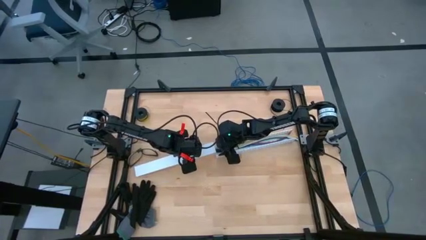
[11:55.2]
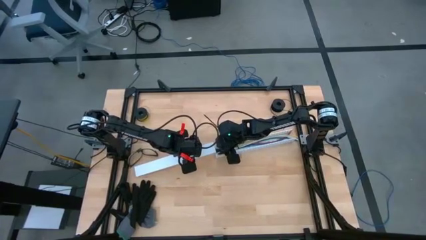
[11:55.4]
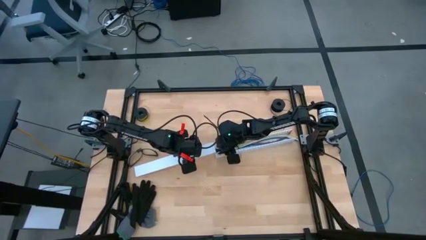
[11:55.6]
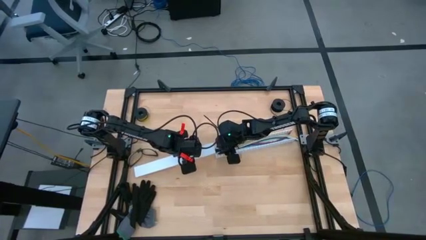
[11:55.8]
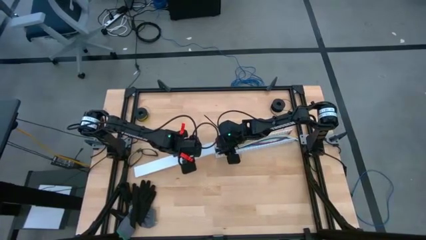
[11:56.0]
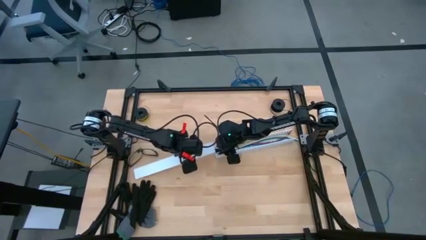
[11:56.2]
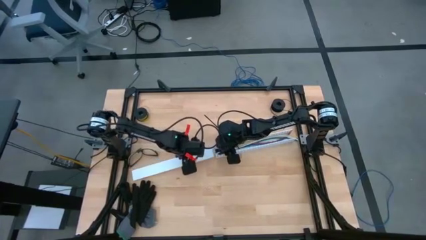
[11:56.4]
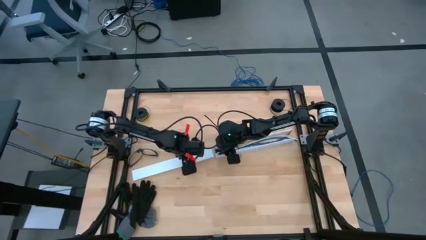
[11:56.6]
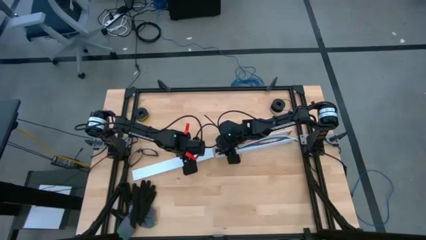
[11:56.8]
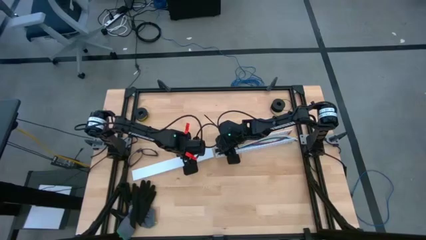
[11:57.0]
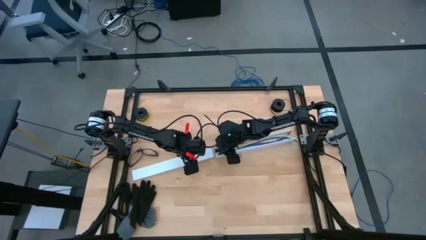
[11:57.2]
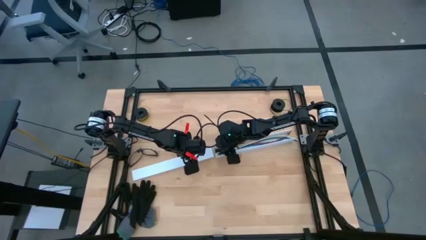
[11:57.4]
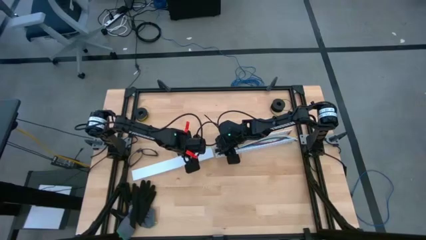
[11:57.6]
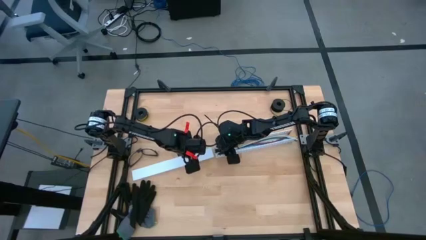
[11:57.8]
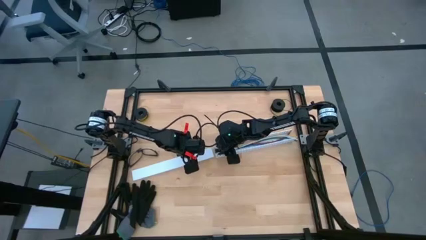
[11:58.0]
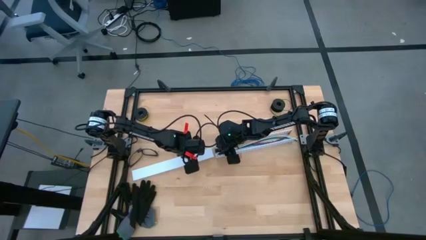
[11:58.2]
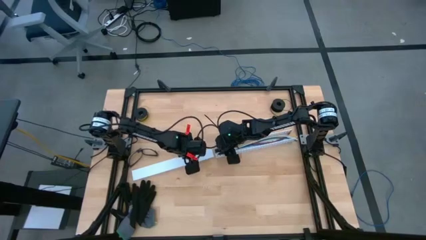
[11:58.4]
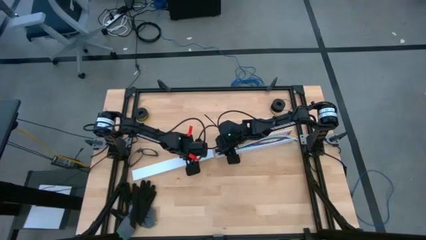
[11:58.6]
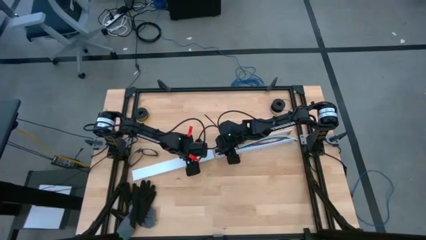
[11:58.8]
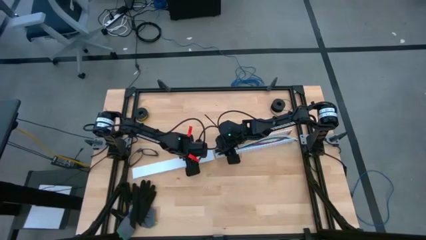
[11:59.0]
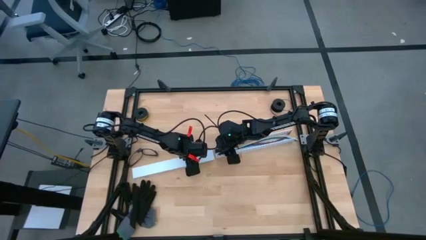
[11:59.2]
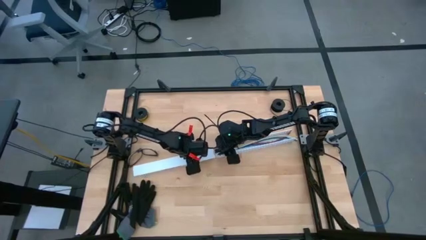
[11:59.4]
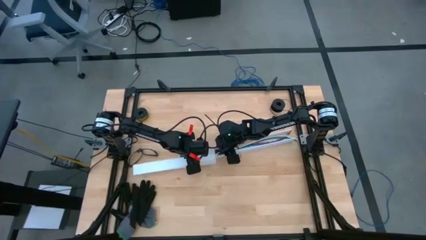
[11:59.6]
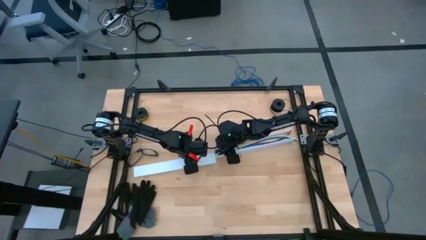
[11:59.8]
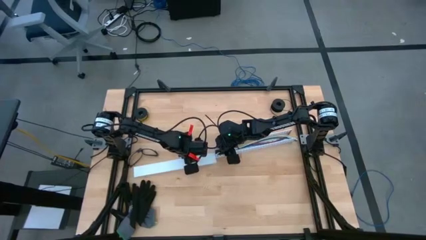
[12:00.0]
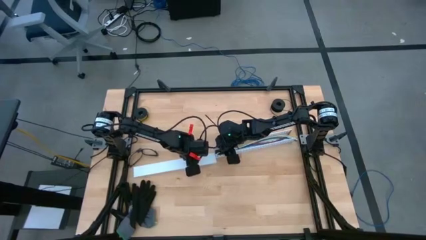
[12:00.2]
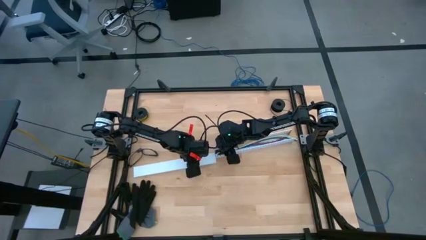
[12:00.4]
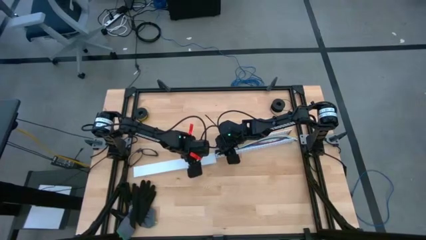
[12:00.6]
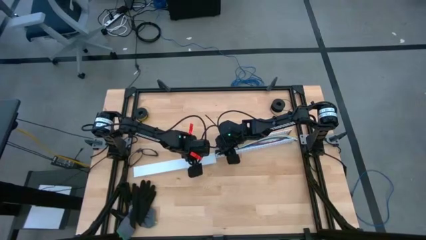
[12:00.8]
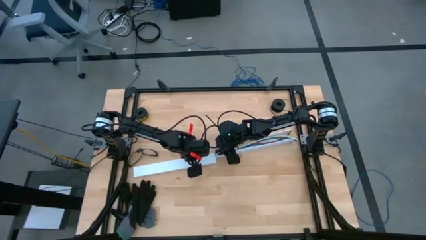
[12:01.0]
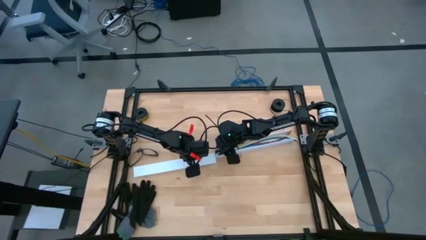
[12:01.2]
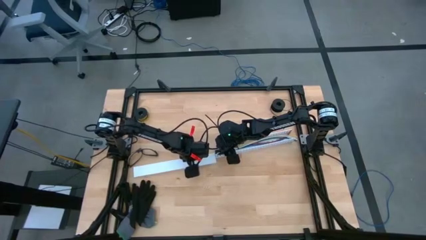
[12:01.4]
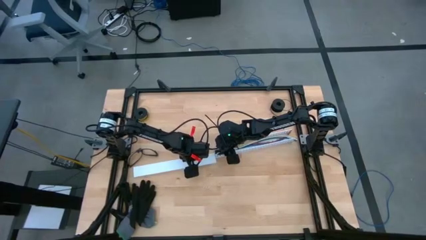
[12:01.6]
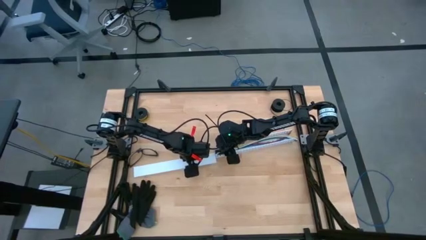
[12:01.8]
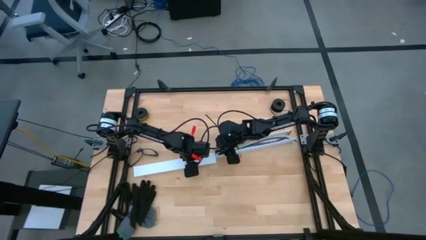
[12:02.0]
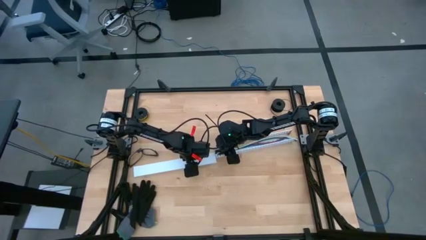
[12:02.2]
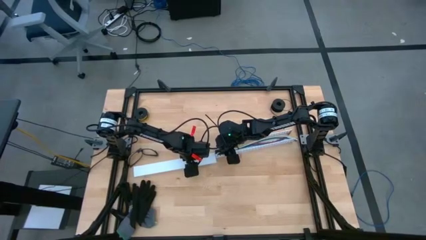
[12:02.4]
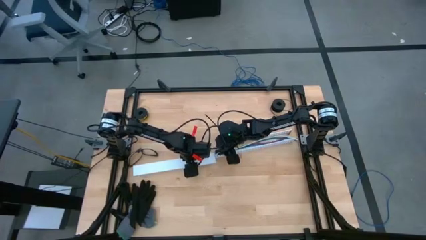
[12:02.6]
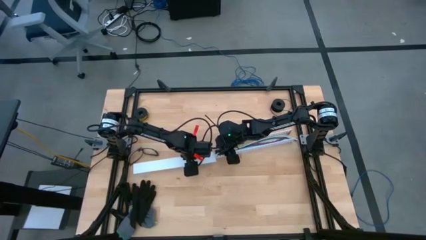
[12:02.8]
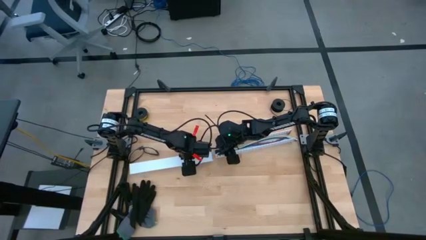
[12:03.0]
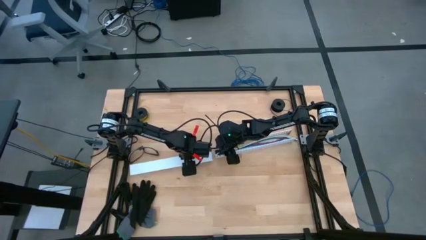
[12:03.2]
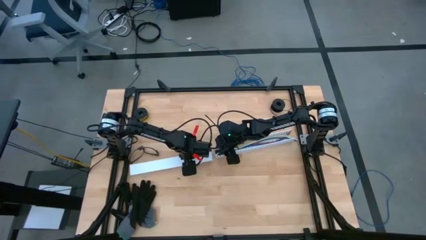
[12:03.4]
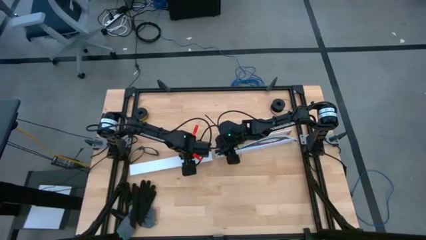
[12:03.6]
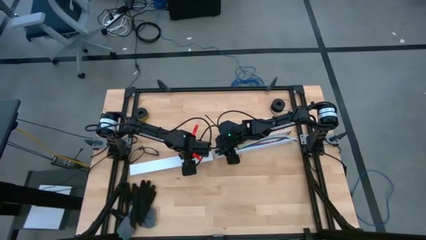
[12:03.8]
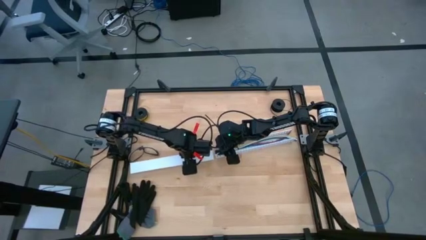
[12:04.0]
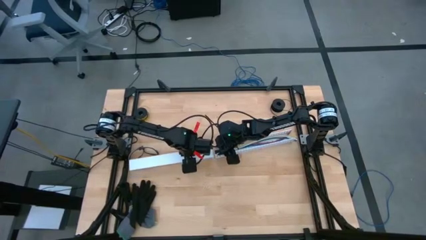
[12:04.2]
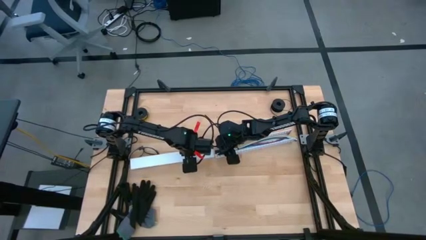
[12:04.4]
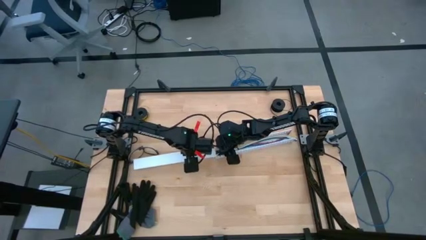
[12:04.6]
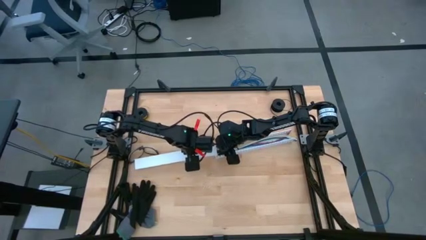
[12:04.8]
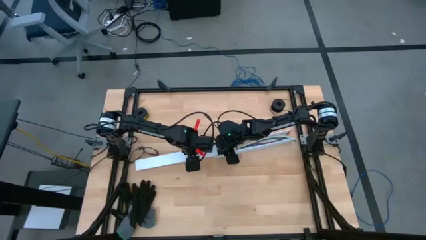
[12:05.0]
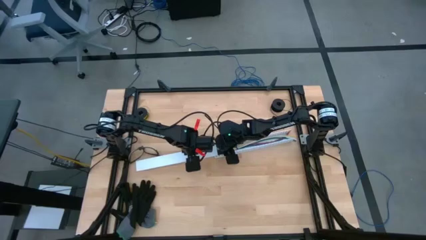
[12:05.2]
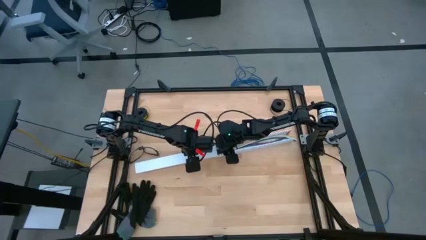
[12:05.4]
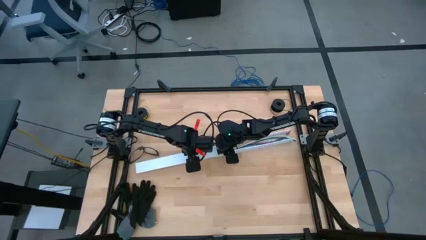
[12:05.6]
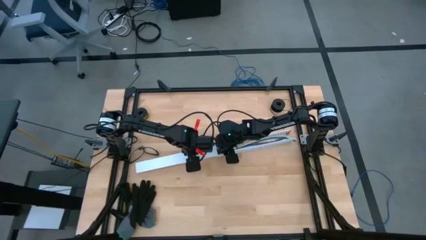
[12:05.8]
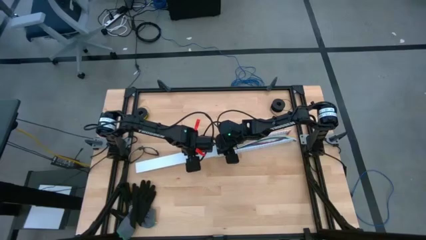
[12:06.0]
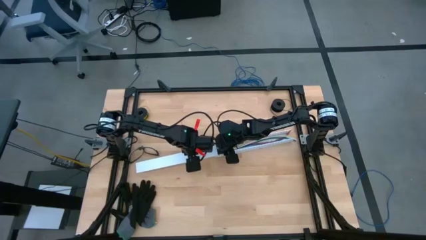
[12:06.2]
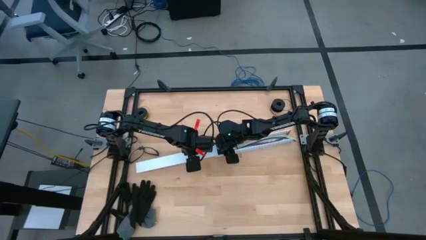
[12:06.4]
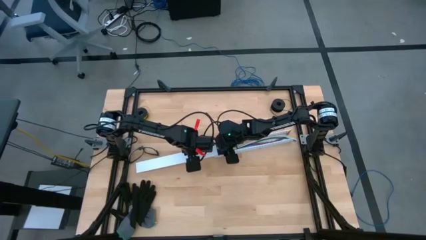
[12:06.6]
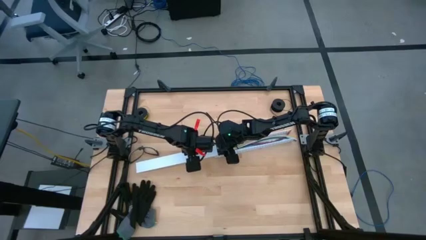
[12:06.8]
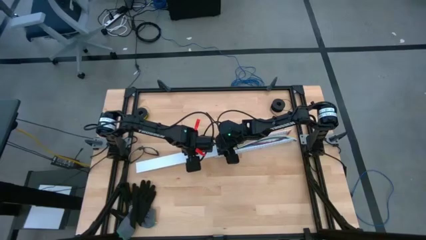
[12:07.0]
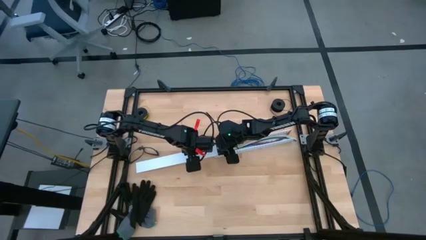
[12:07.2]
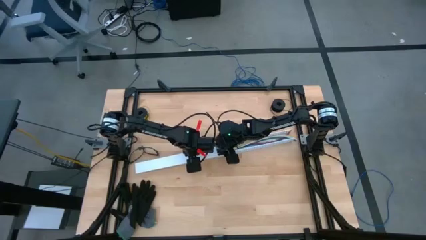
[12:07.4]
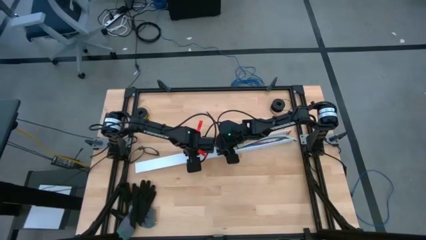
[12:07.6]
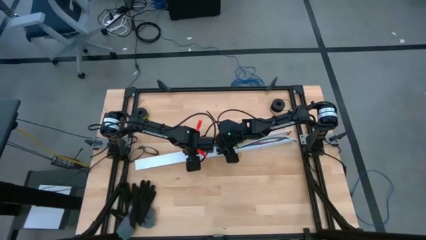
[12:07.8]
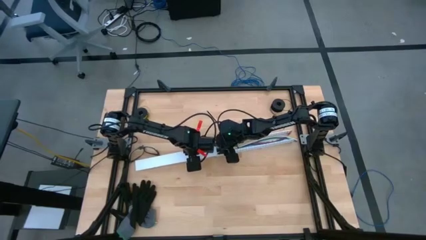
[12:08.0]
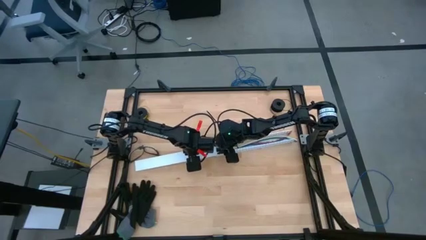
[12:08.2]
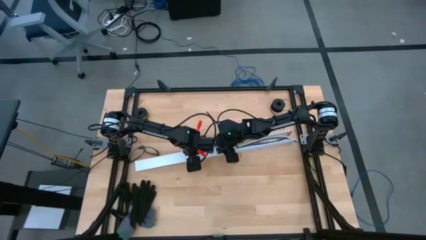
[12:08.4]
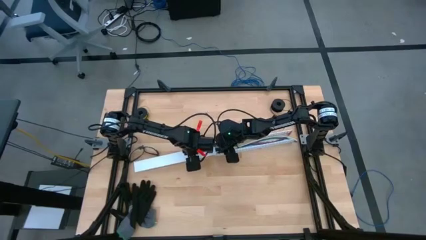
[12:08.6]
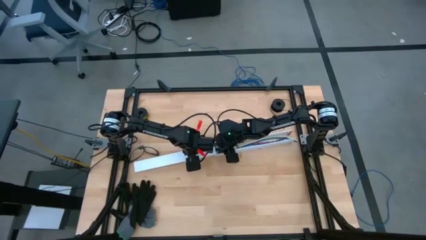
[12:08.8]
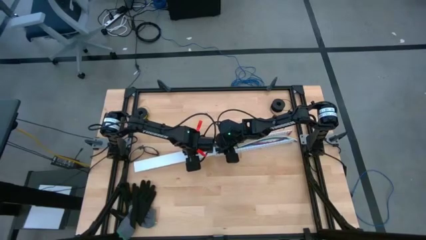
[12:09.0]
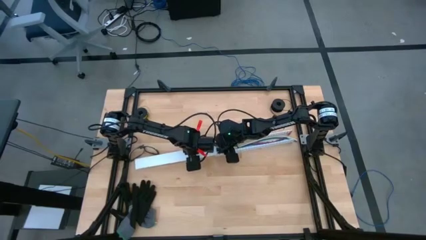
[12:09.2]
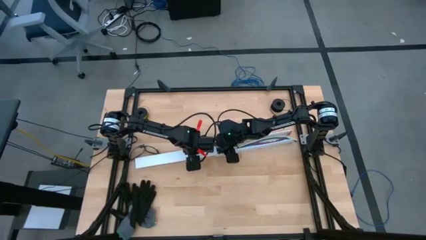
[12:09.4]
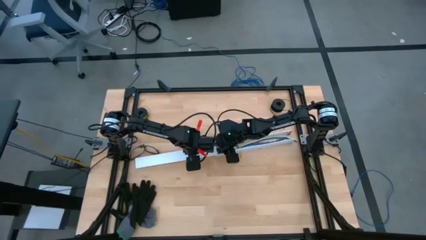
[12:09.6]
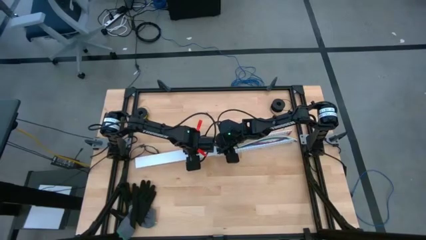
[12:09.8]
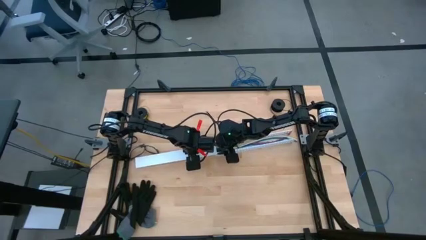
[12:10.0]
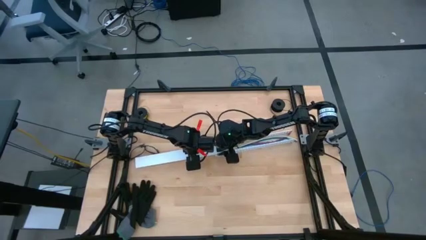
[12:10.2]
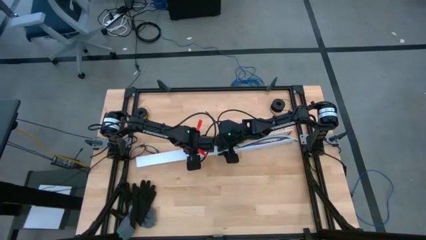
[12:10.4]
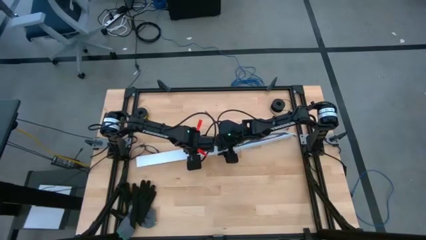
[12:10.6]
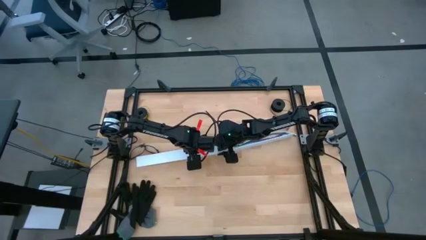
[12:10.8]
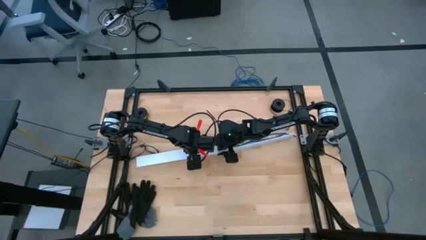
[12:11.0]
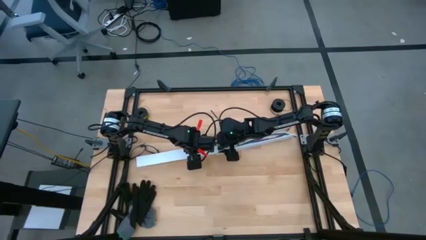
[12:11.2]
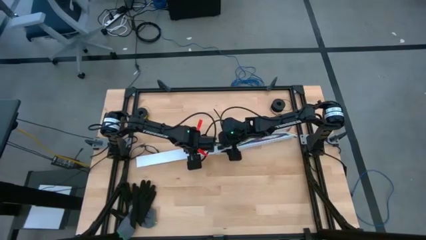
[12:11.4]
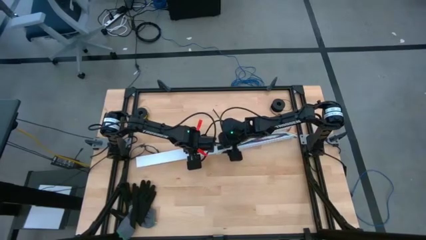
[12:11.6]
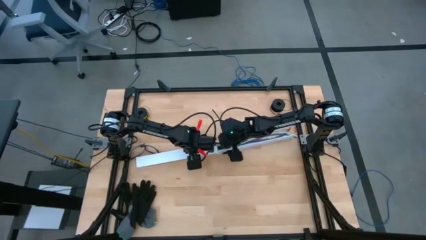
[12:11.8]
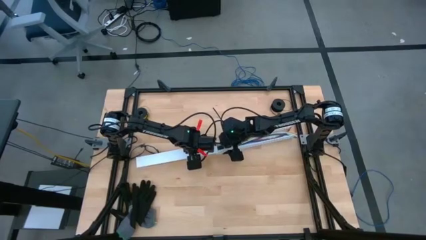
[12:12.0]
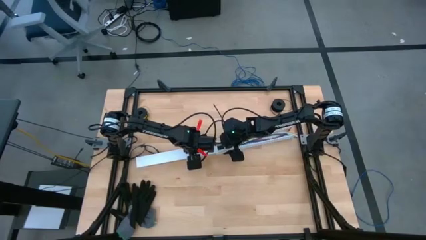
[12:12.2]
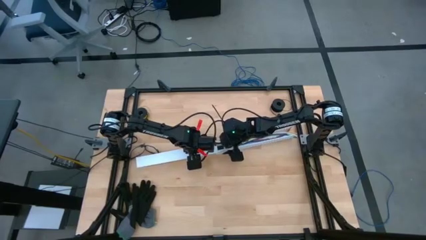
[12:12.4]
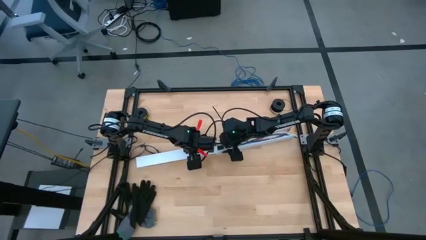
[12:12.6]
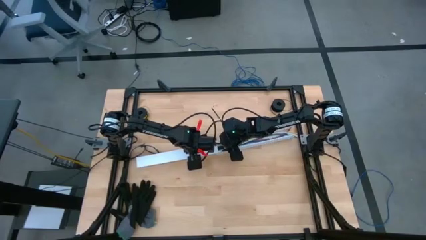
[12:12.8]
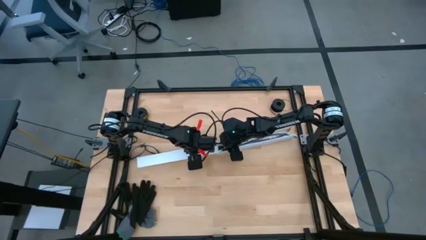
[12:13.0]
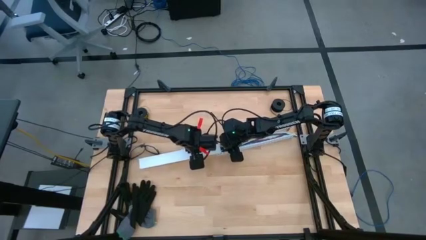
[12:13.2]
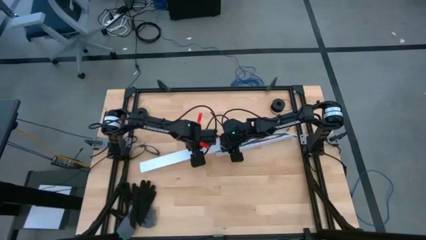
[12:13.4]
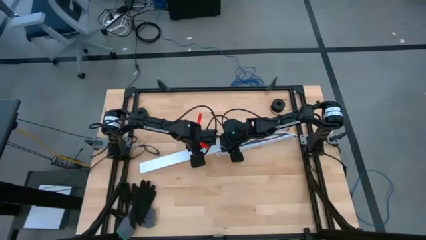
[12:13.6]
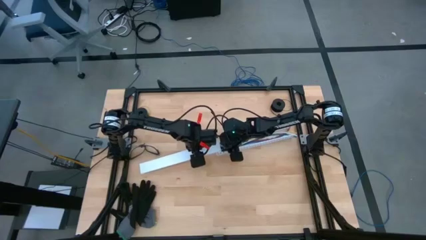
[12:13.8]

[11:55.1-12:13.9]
Task: Ziptie cables
Close the white cable duct
